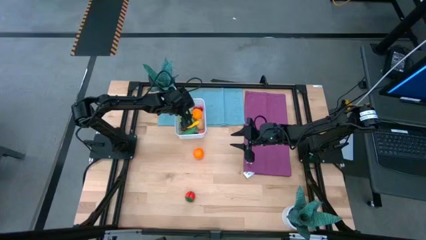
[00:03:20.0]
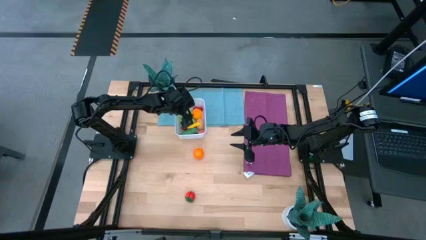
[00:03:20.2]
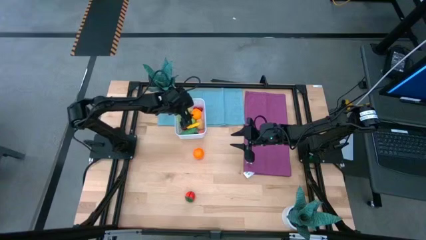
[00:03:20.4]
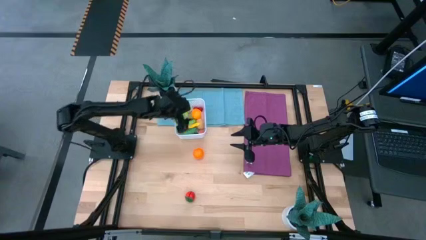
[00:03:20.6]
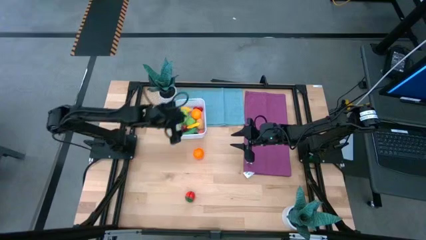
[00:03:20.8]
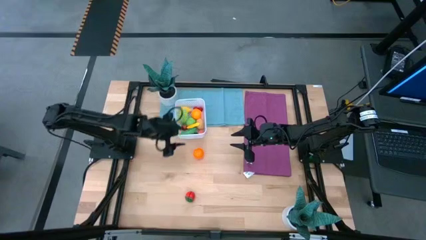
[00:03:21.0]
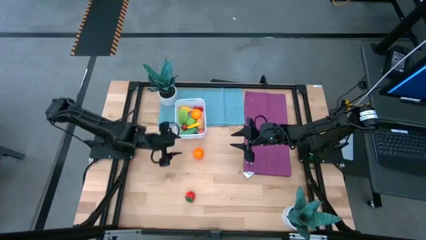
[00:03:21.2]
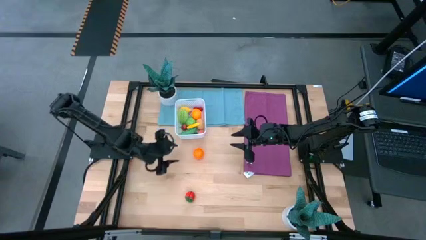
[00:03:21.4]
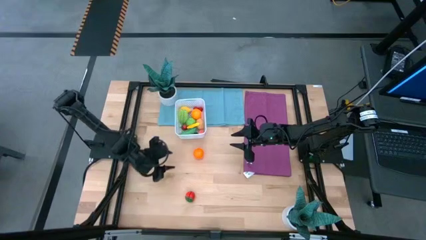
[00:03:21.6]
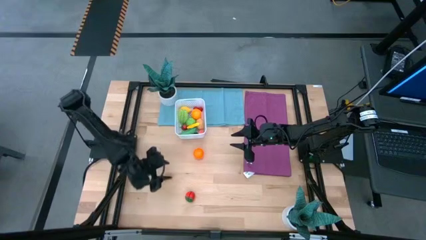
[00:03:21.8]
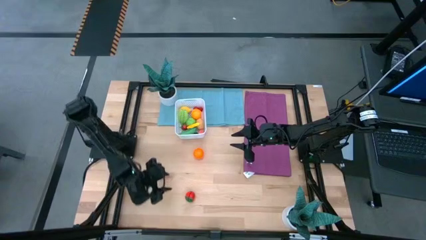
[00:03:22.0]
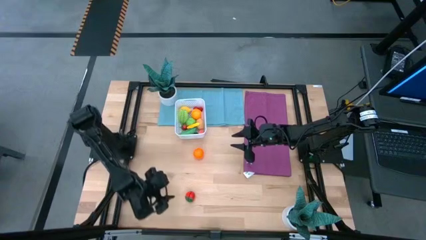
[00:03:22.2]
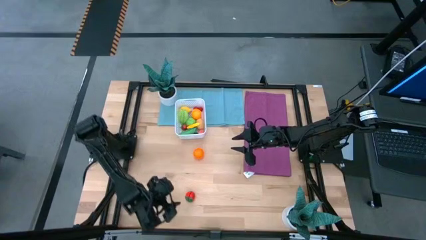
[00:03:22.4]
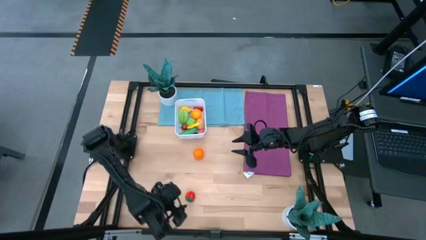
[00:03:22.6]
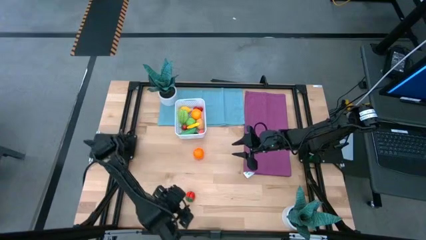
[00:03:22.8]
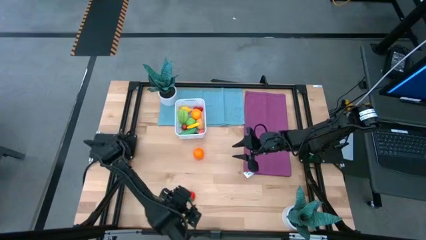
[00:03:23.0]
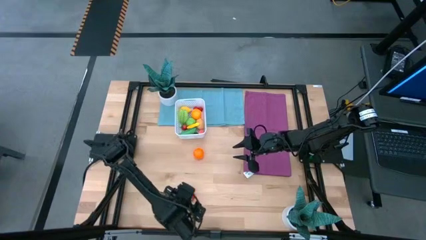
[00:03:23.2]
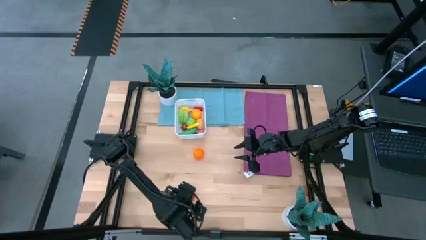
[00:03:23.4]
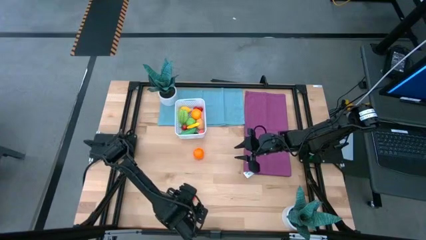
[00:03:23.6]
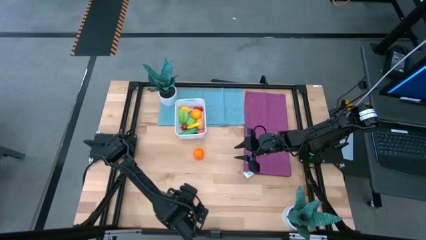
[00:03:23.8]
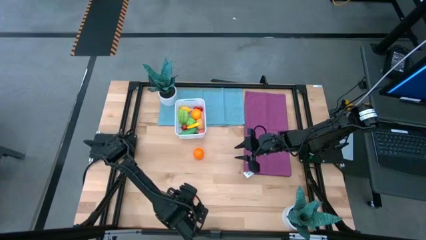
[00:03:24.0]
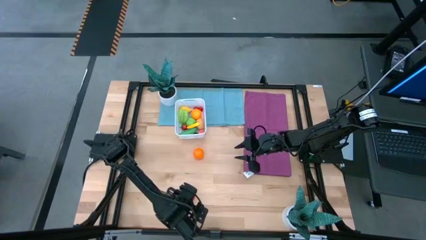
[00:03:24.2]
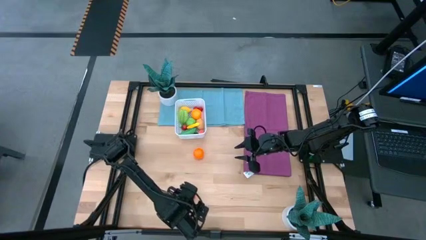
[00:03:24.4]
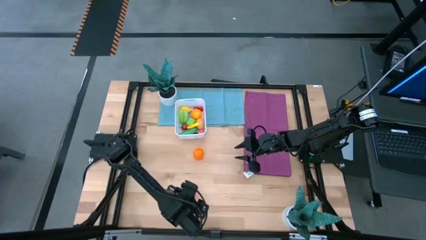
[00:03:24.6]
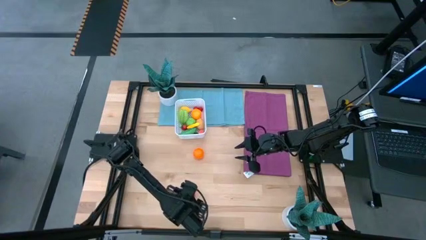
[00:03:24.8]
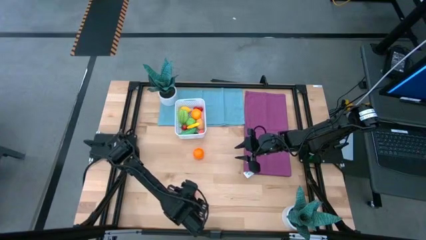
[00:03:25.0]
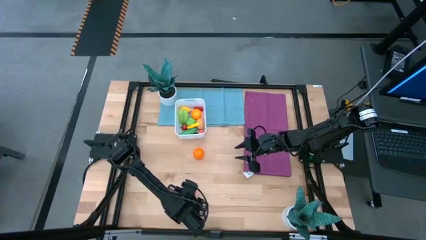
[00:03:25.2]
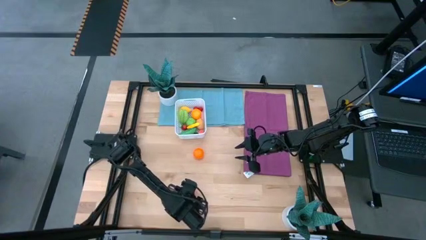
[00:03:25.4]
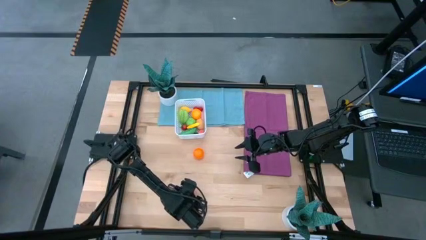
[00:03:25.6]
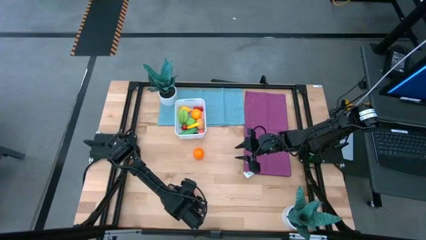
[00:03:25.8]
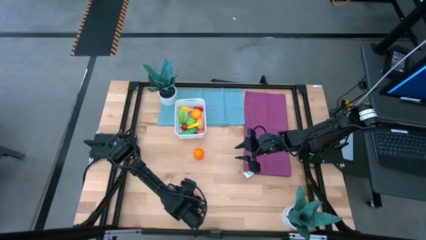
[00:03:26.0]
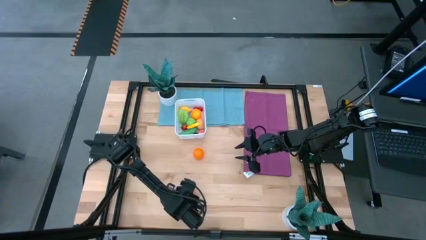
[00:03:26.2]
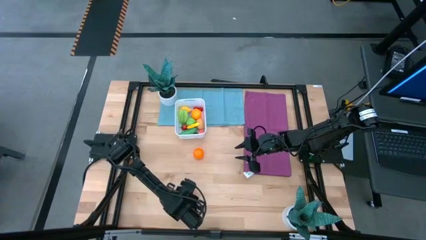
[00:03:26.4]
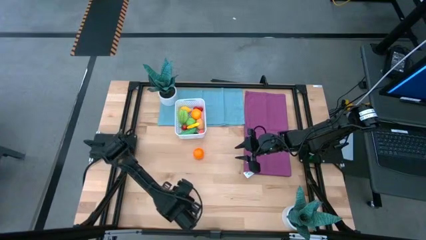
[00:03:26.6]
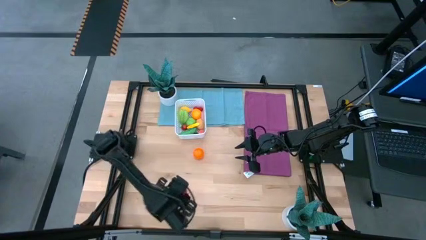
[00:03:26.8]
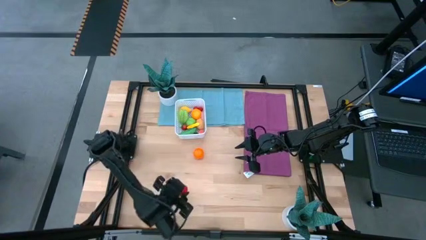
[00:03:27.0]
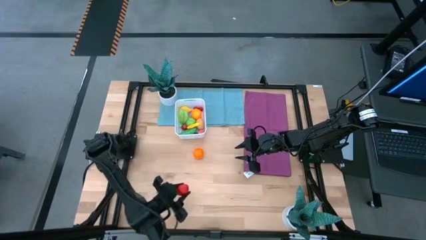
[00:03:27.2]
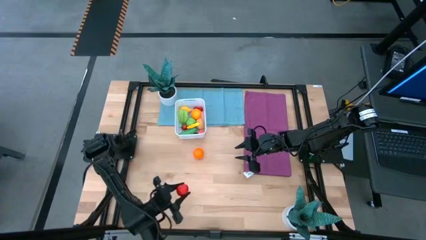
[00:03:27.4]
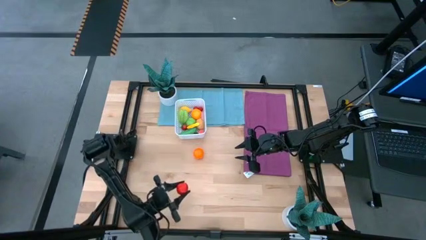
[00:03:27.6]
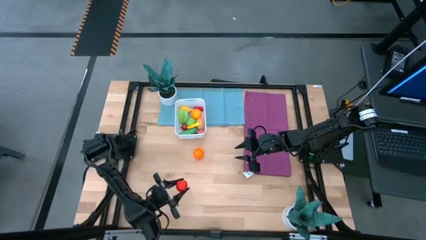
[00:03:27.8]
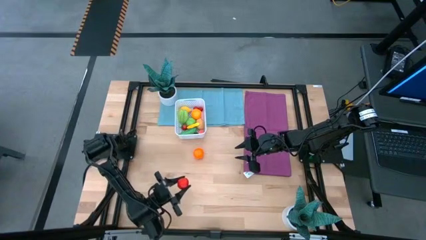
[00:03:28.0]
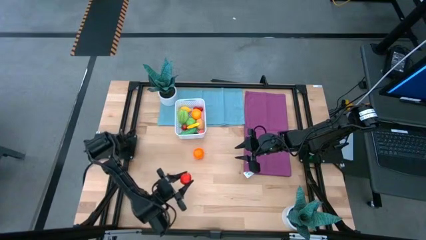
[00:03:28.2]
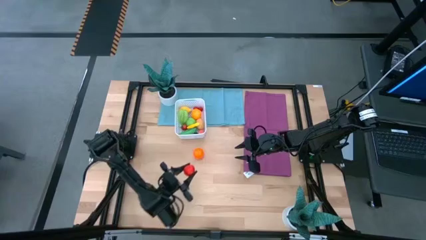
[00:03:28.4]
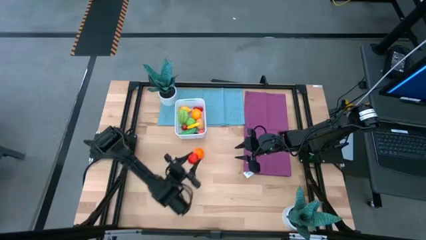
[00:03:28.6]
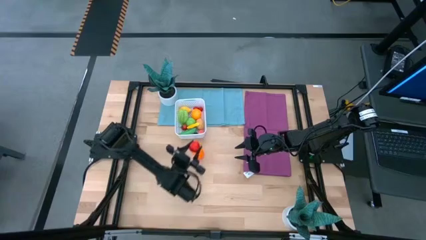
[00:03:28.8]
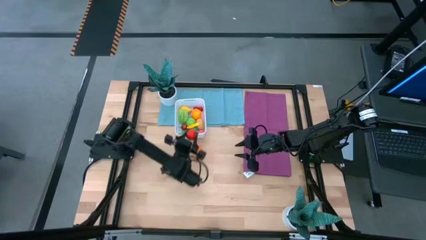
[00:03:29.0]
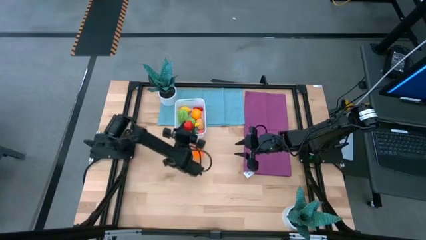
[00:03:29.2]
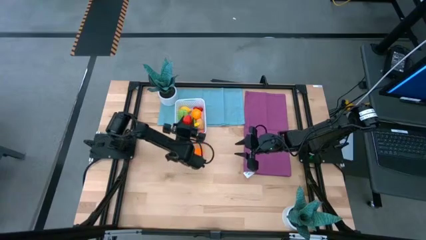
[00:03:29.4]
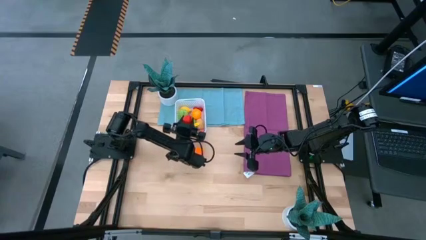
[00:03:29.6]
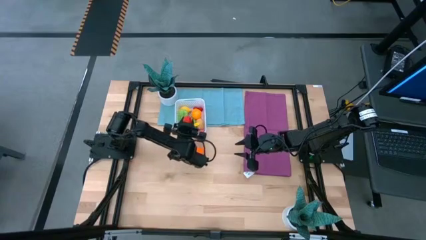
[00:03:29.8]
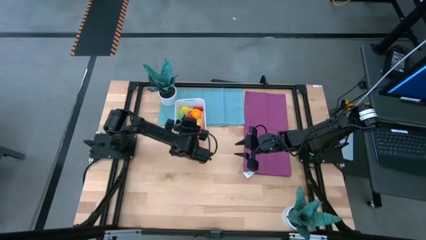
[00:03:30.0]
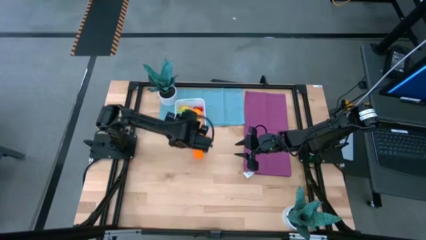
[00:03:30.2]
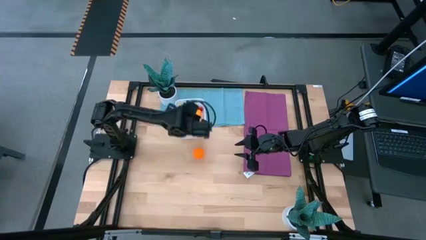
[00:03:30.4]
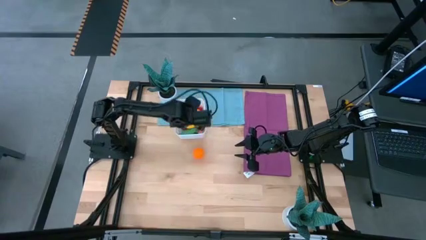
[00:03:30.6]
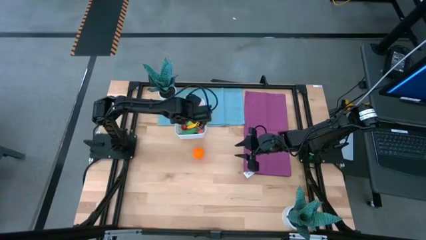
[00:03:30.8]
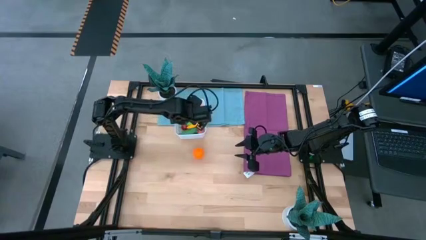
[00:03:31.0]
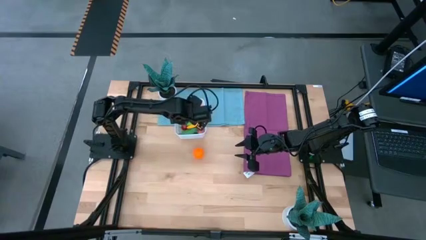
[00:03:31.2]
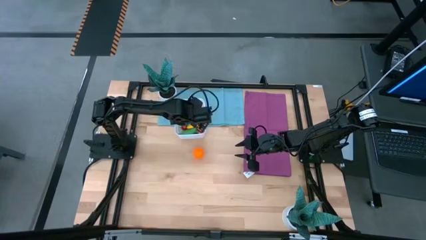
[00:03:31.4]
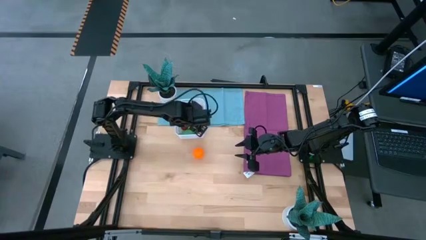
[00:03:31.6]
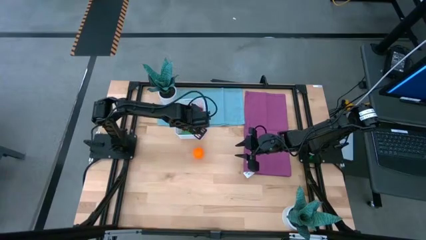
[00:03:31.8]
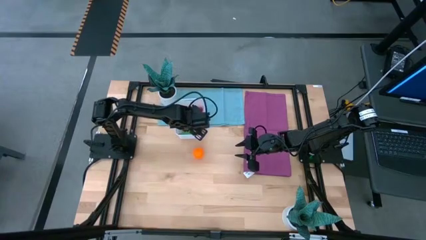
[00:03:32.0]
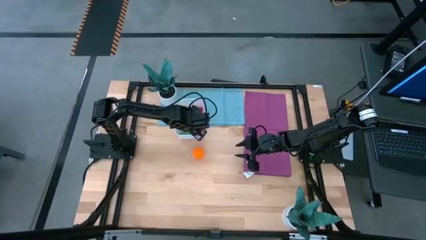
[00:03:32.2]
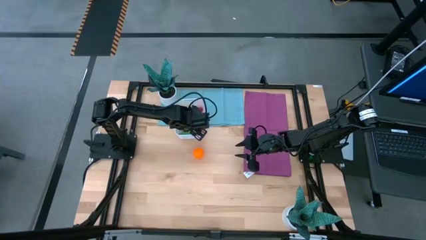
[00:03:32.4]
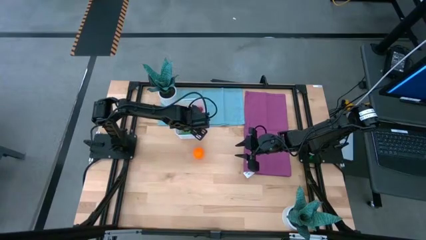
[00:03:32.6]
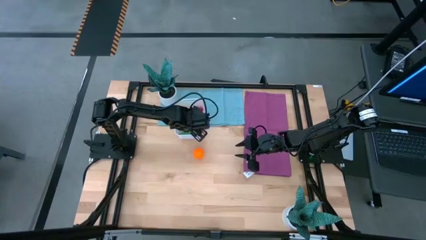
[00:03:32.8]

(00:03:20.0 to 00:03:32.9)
Task: Pick and placing Produce into tupperware
Put the red strawberry into the white basket

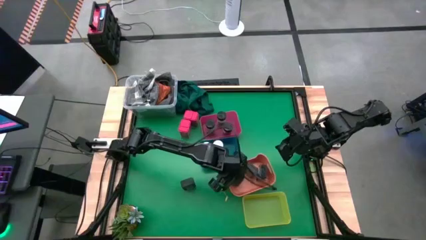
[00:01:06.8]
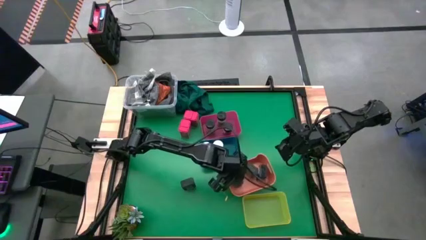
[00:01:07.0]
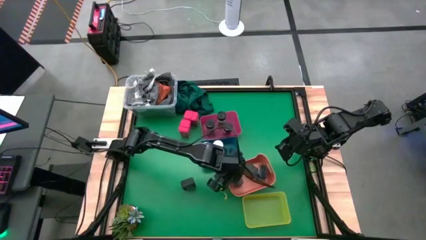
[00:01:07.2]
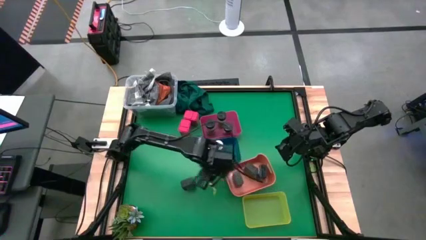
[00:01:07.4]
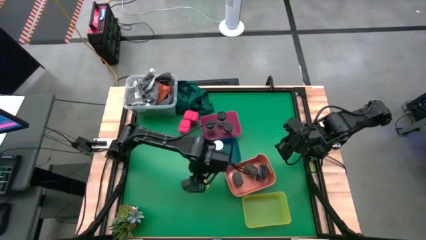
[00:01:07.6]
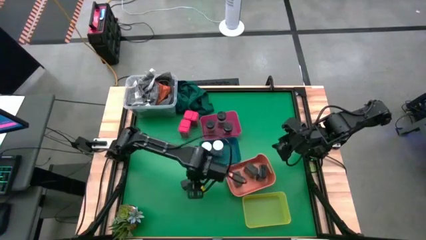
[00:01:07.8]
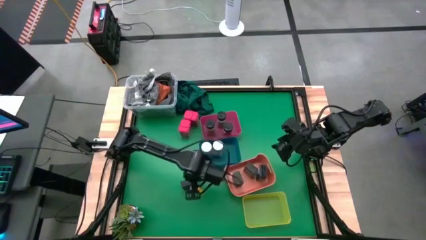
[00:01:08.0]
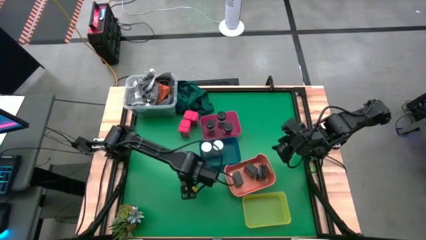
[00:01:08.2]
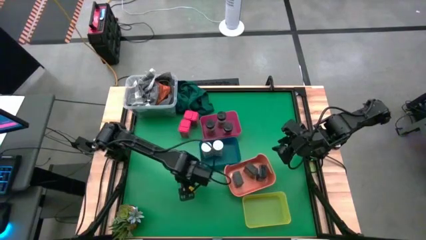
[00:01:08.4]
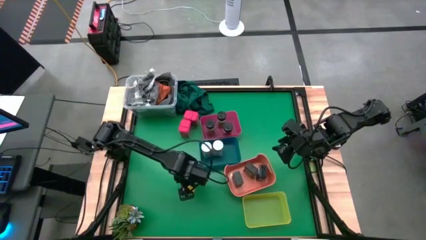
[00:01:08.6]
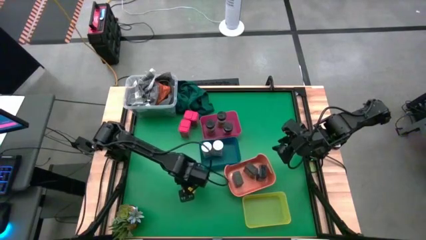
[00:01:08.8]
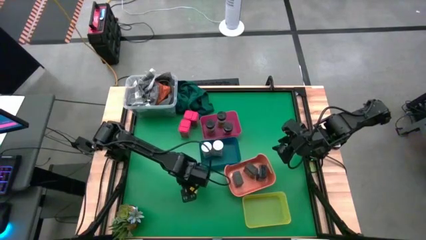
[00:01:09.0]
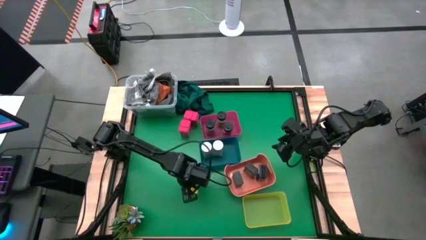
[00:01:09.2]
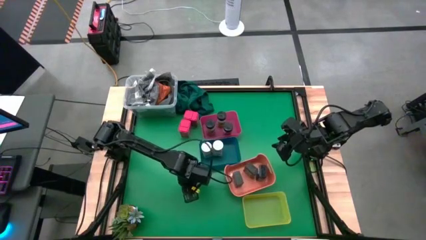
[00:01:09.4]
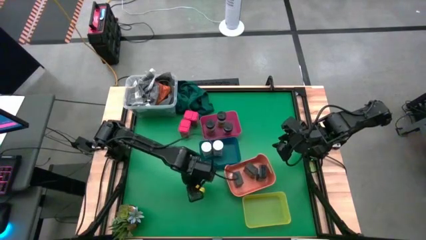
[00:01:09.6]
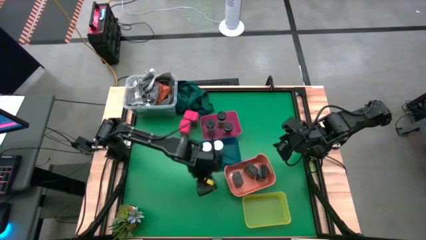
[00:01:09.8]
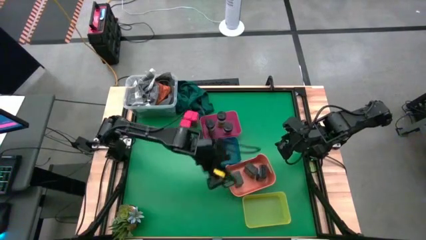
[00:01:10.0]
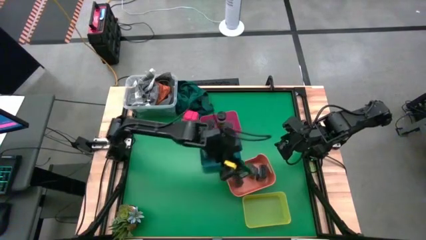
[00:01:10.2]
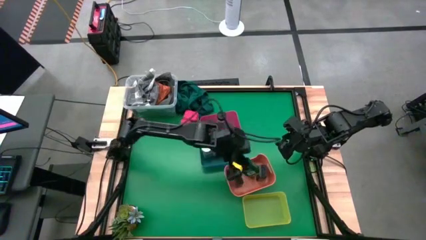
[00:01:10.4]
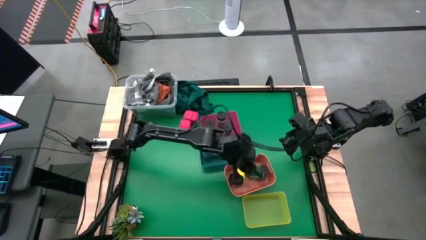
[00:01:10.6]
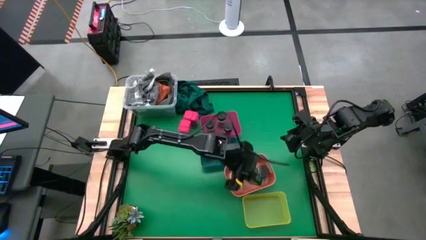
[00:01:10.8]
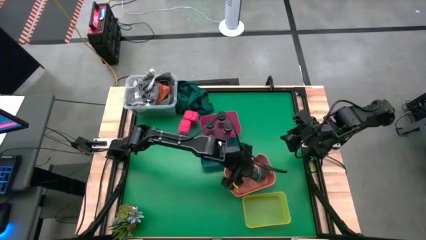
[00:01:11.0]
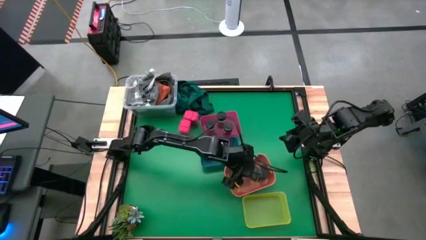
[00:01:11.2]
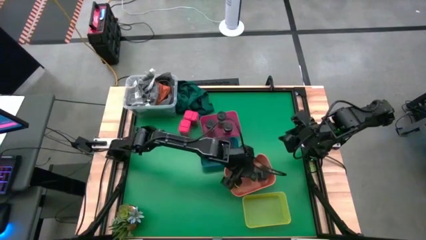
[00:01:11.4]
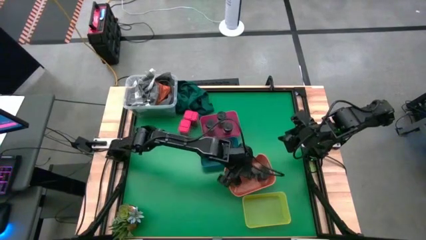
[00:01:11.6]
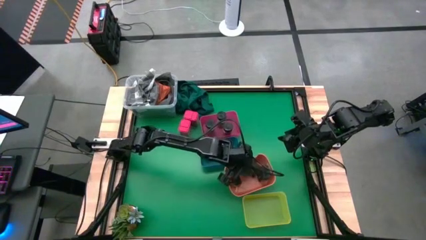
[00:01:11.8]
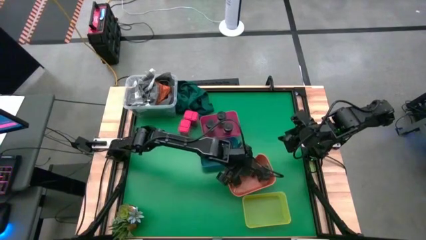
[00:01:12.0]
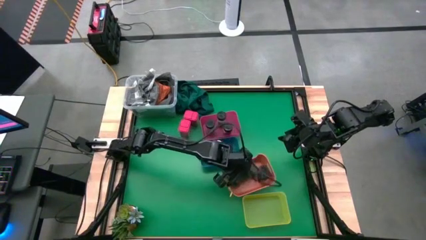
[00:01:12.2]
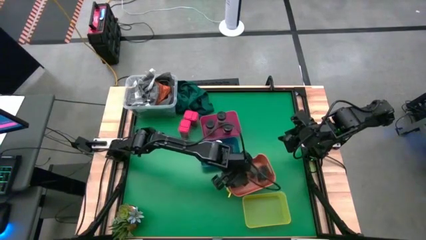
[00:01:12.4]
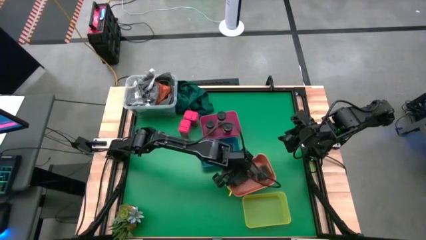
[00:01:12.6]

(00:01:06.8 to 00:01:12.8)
Task: Sort spices by type
Put the black seasoning can into the orange bin
